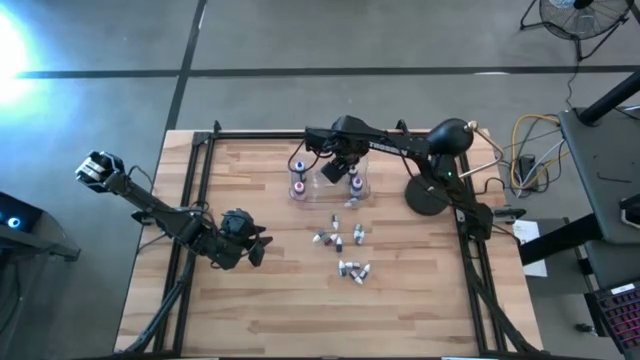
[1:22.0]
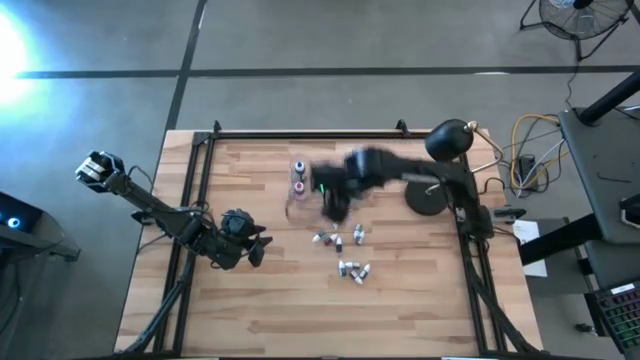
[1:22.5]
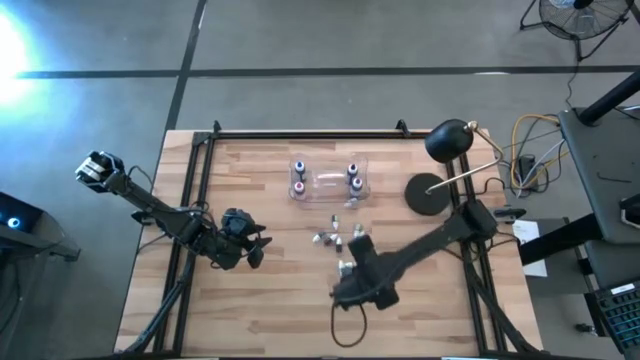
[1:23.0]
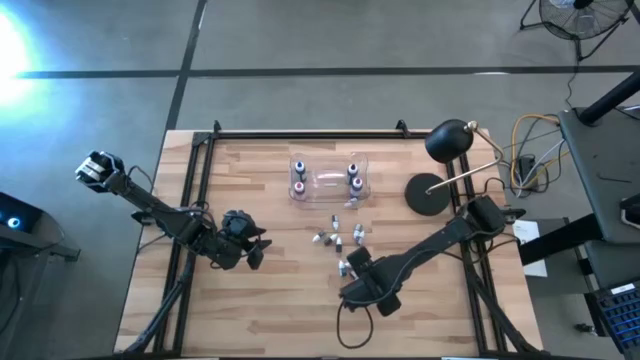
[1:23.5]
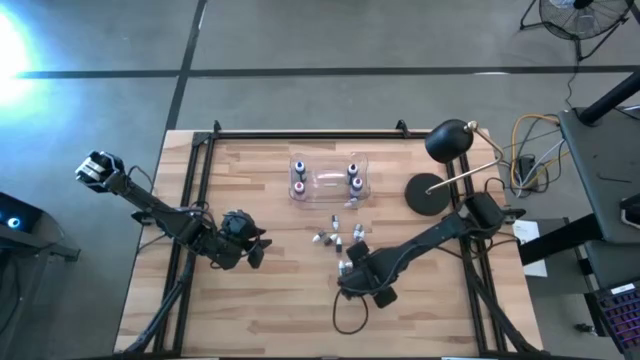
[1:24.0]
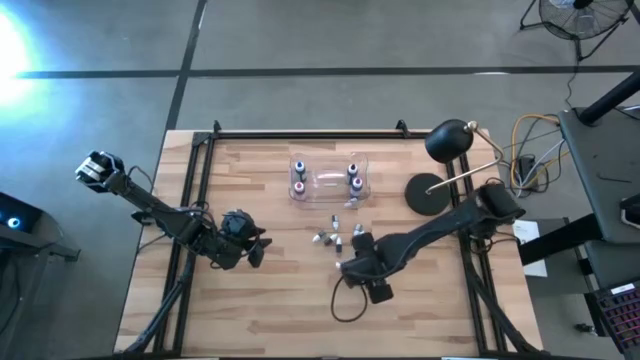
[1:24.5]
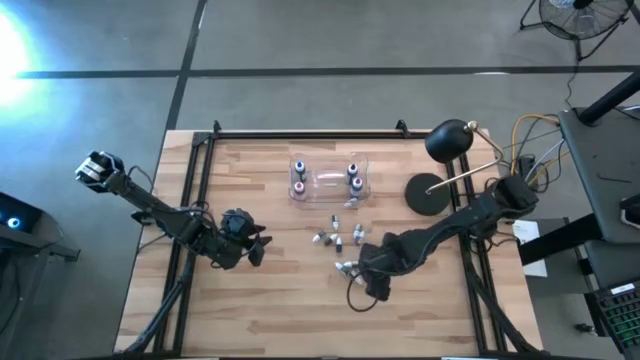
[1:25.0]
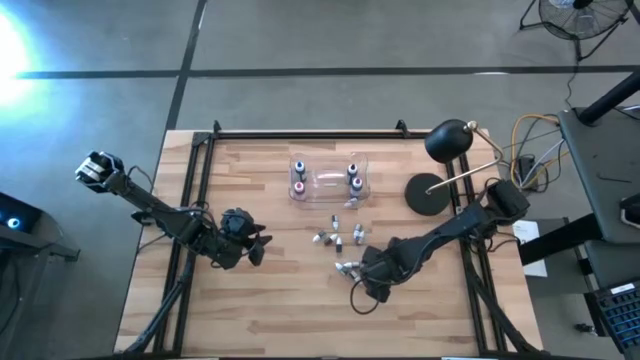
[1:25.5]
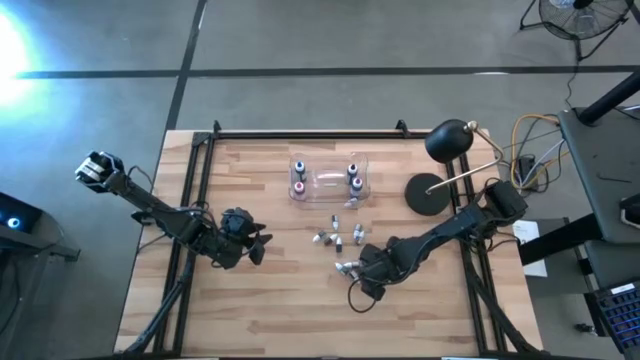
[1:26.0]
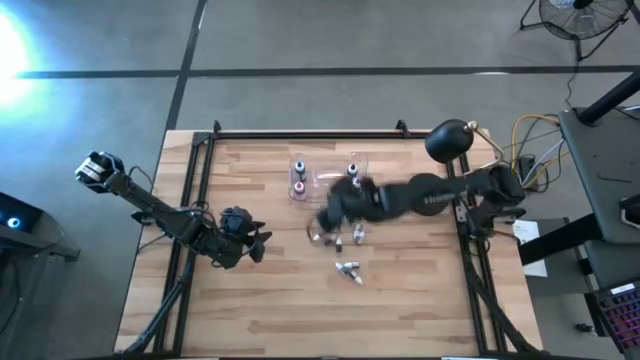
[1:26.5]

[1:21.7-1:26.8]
Task: Pick & Place food coloring
Put the small red food coloring bottle into the transparent bin

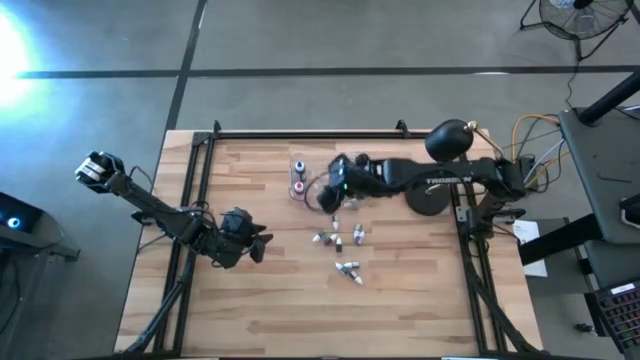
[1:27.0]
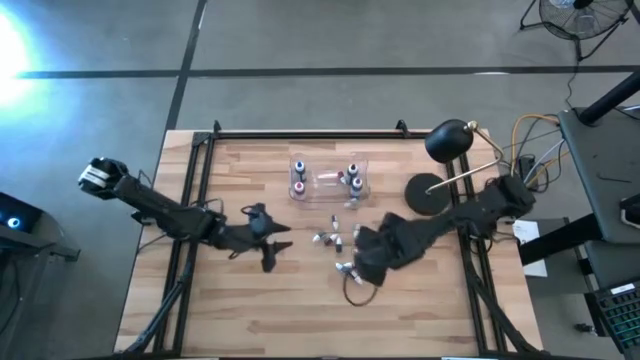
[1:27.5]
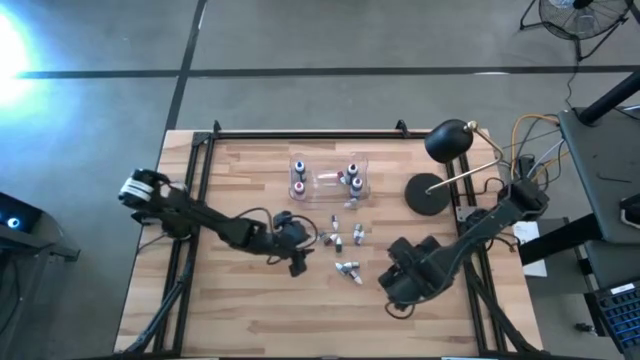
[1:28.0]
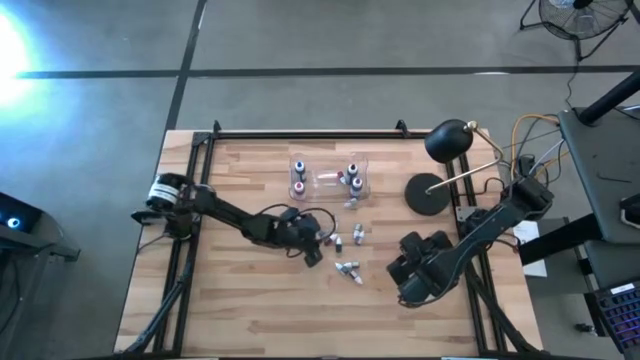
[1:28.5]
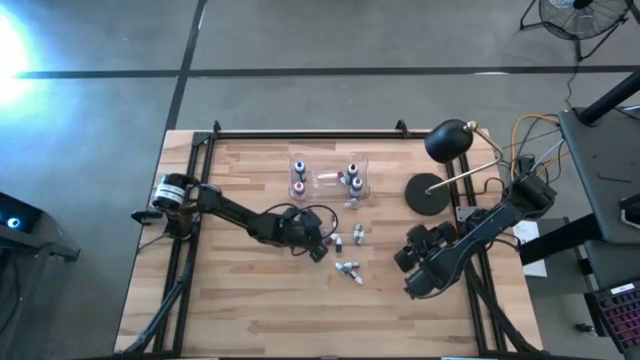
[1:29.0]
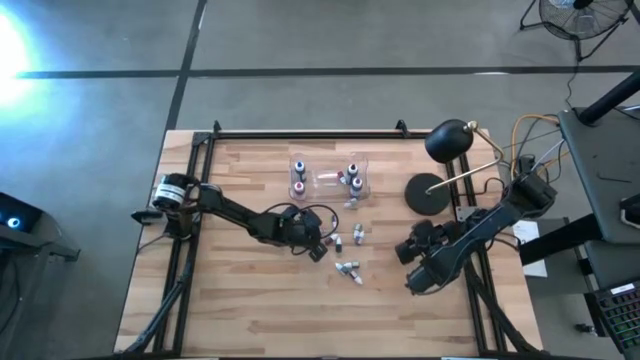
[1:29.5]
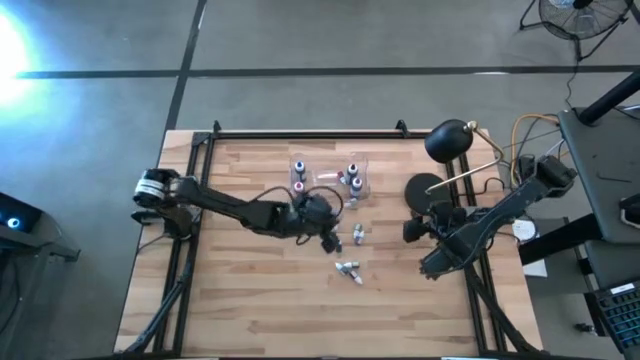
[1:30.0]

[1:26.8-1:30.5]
Put the small green food coloring bottle into the transparent bin

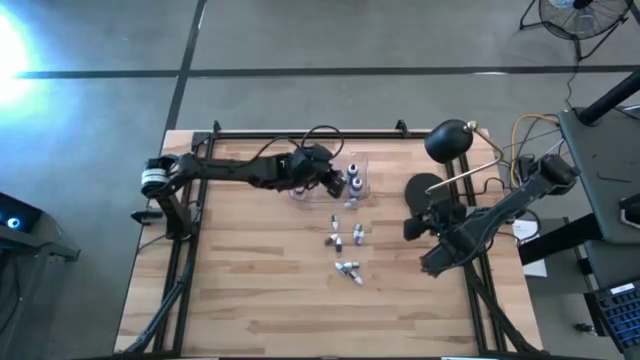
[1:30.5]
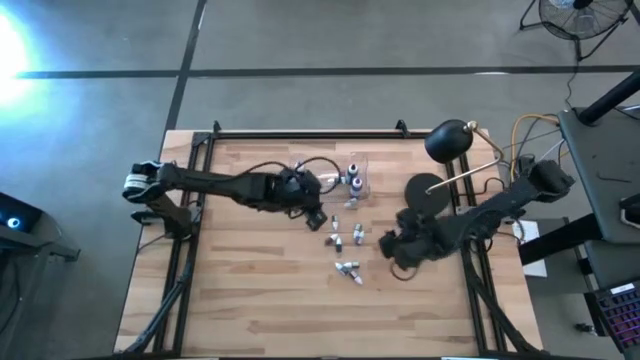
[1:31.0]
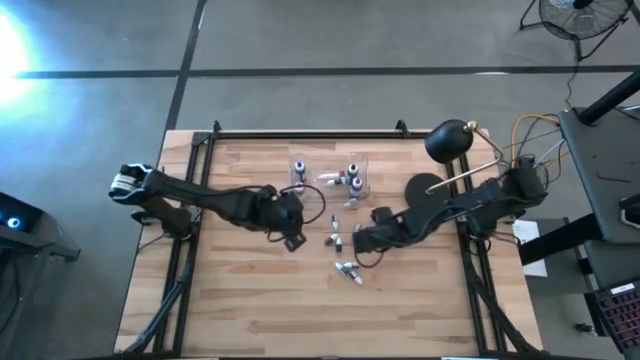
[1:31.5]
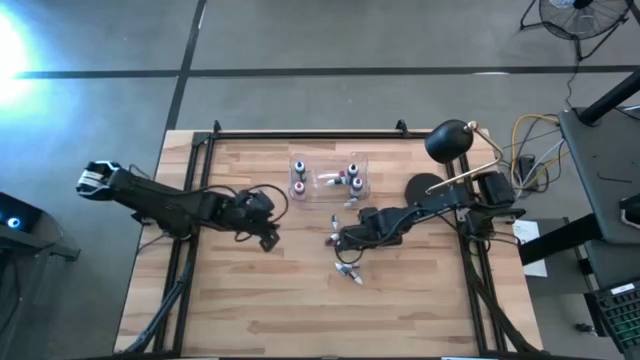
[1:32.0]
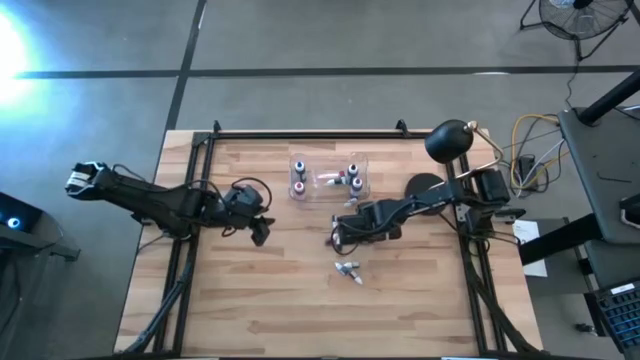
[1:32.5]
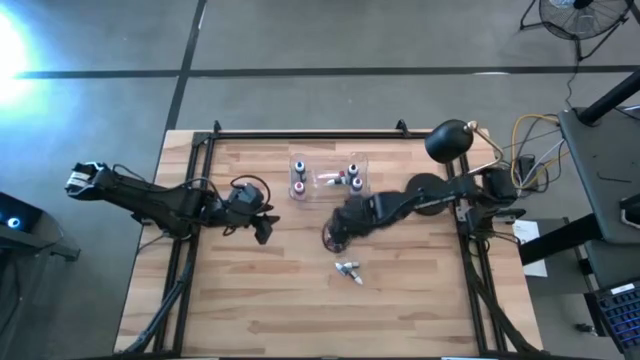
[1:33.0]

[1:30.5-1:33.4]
Put the small purple food coloring bottle into the transparent bin

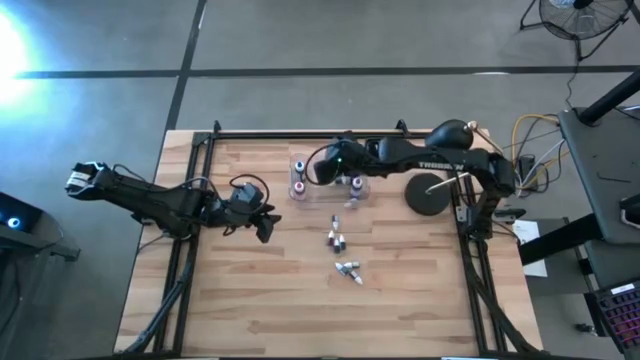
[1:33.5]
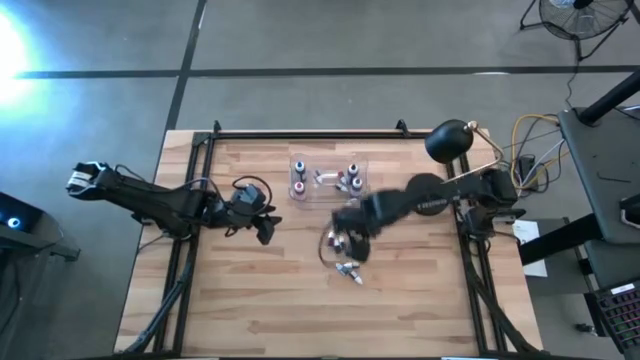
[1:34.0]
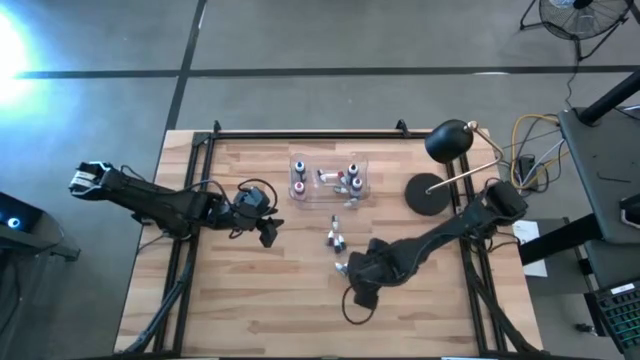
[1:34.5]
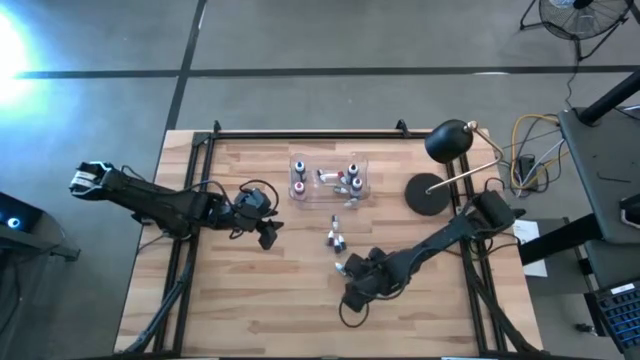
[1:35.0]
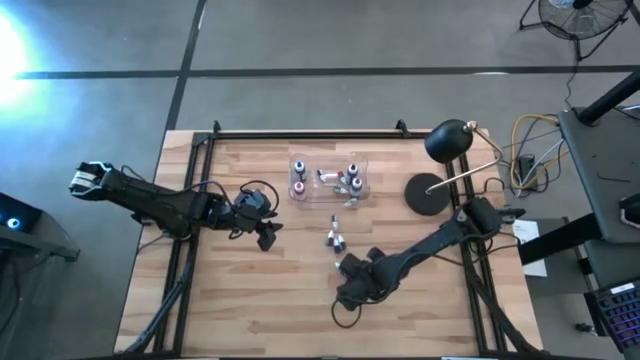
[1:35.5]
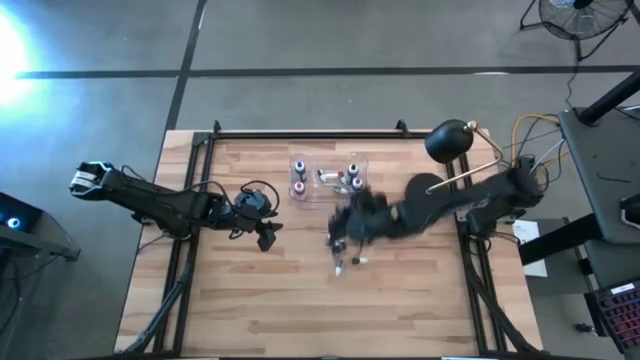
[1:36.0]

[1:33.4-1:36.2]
Put the small red food coloring bottle into the transparent bin

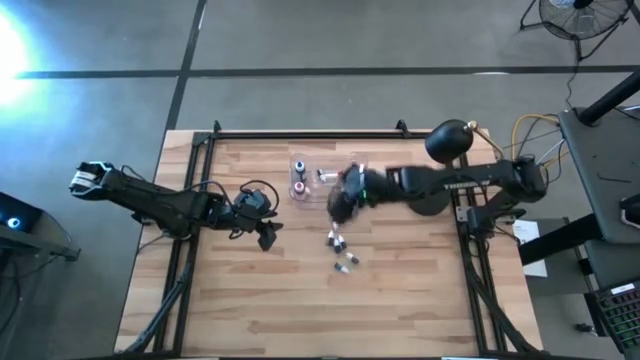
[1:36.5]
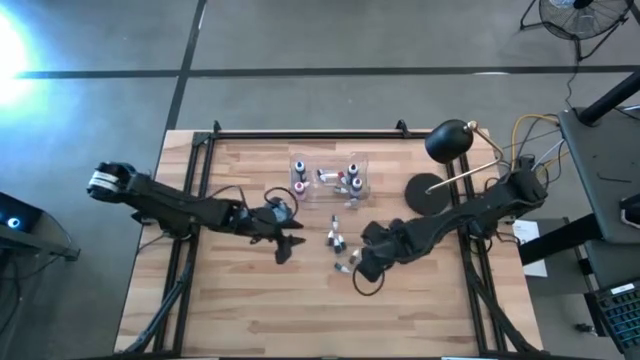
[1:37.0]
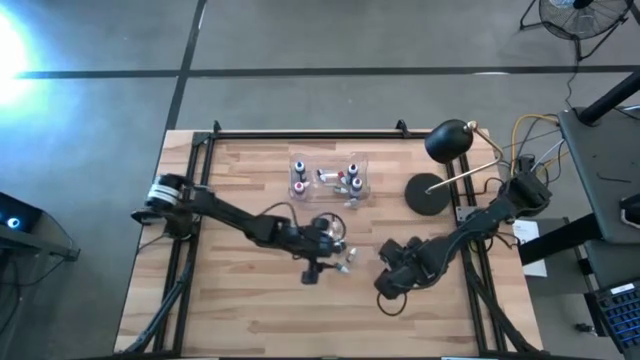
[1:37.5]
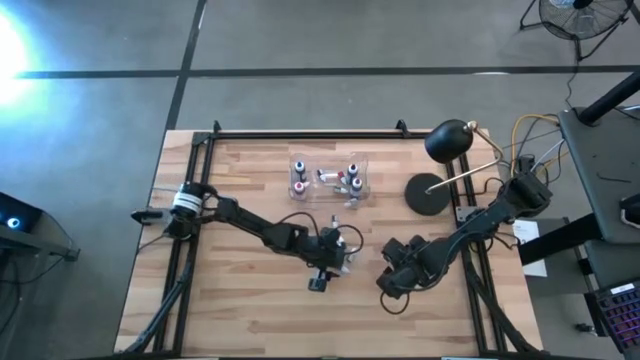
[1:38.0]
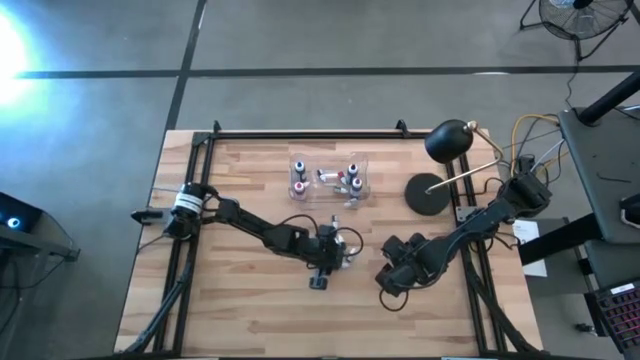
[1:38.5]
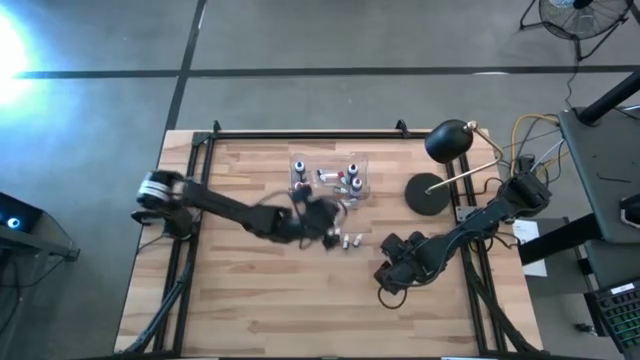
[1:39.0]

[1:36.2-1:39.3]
Put the small blue food coloring bottle into the transparent bin

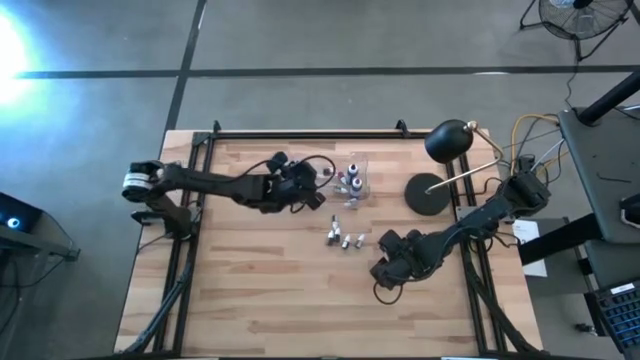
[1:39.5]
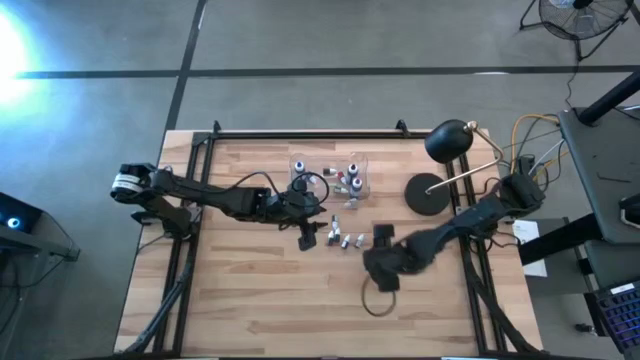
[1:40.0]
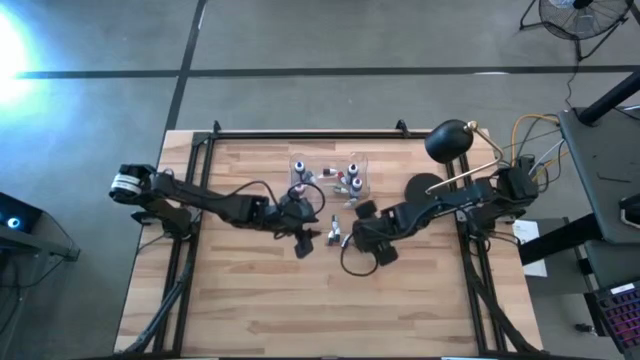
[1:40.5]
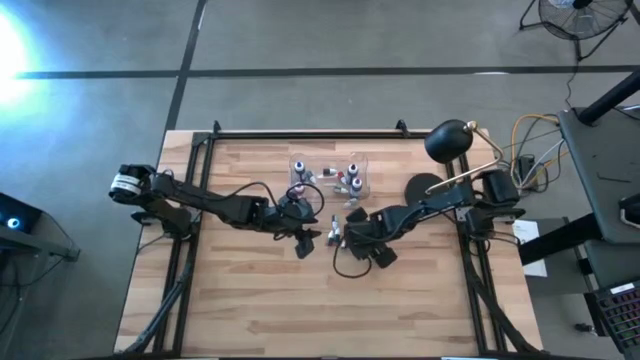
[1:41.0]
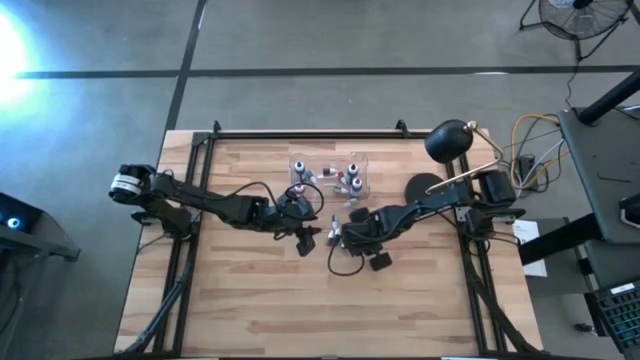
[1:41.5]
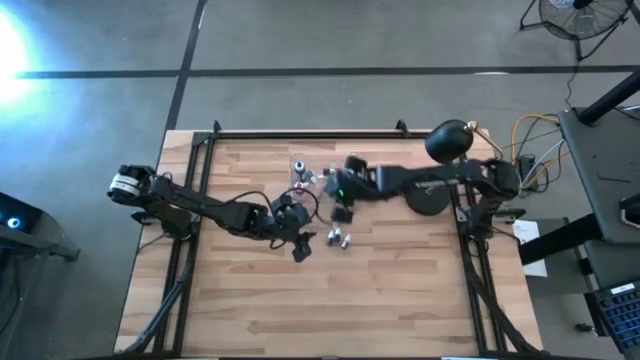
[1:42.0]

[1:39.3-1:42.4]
Put the small brown food coloring bottle into the transparent bin

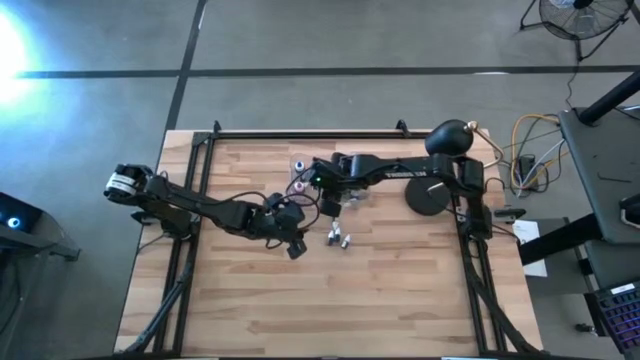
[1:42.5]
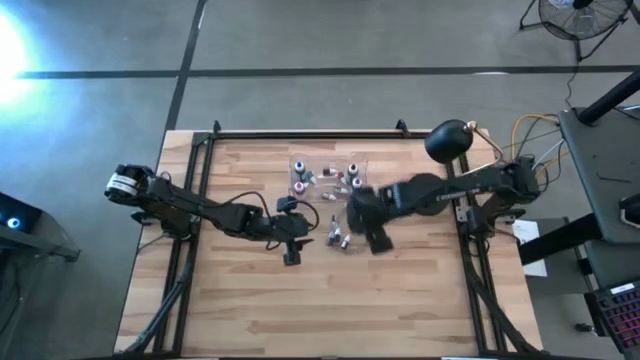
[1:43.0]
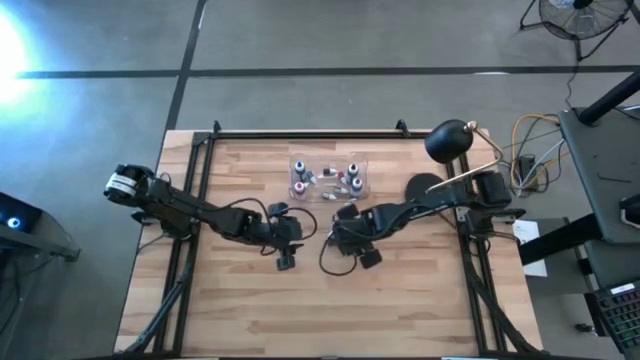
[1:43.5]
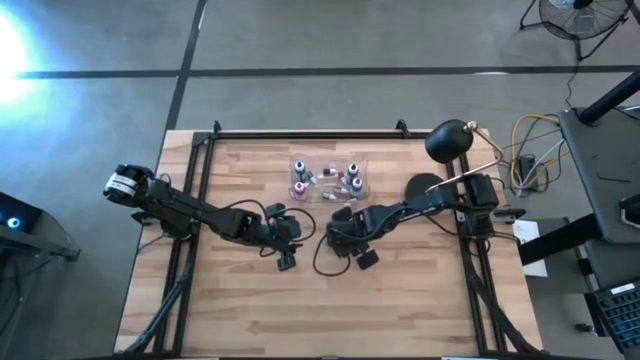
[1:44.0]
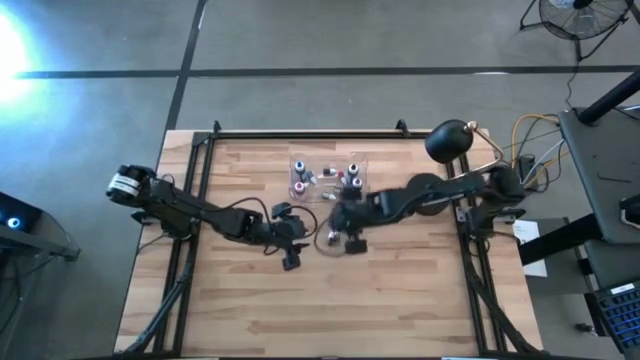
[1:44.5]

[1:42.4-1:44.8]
Put the small green food coloring bottle into the transparent bin
